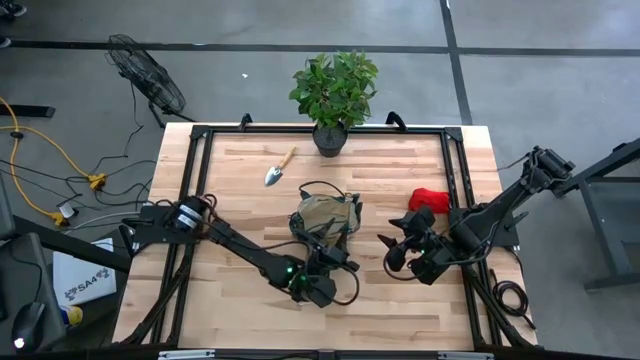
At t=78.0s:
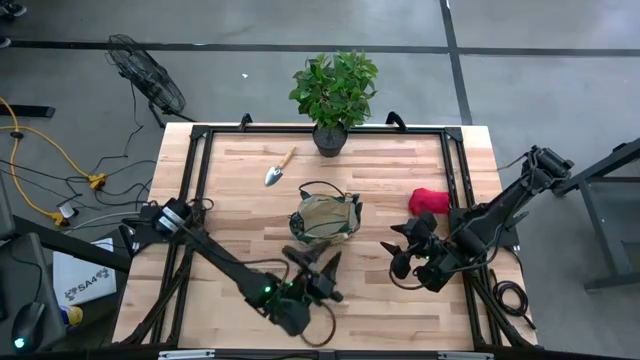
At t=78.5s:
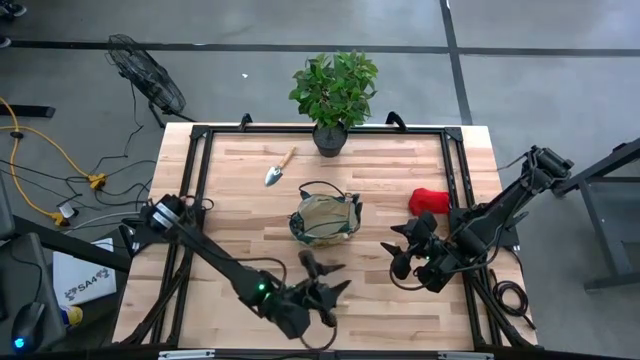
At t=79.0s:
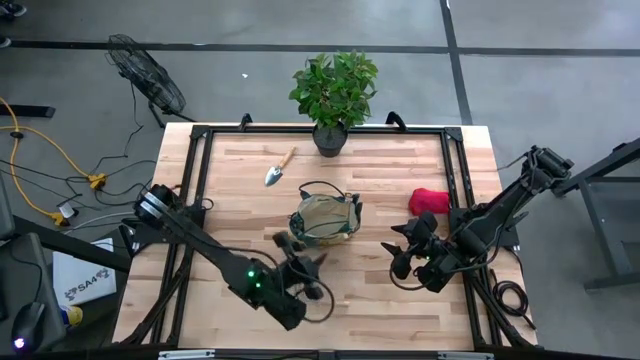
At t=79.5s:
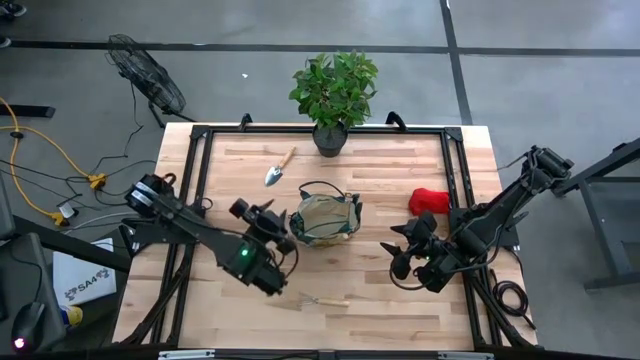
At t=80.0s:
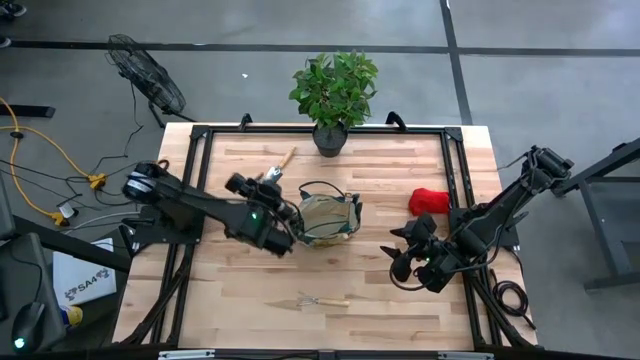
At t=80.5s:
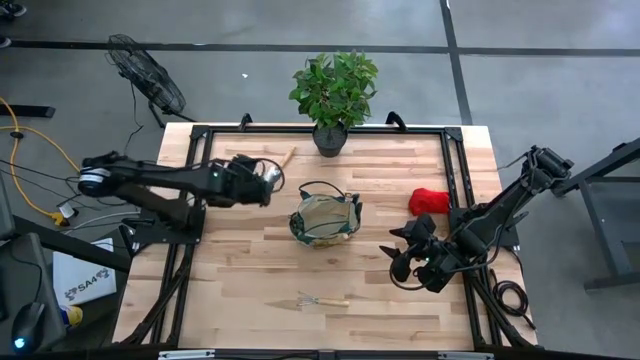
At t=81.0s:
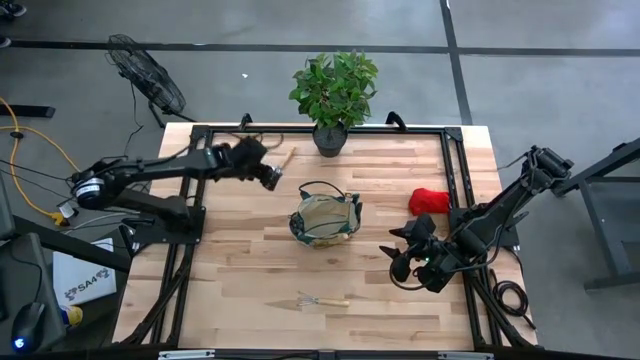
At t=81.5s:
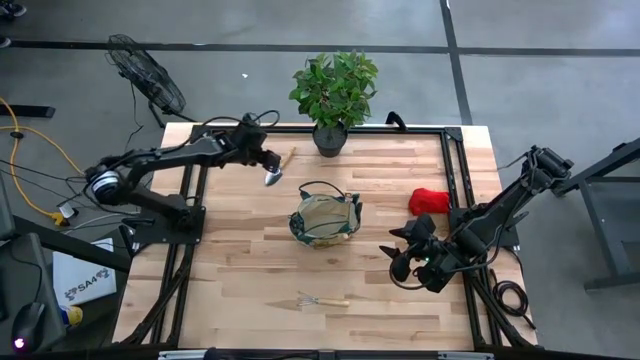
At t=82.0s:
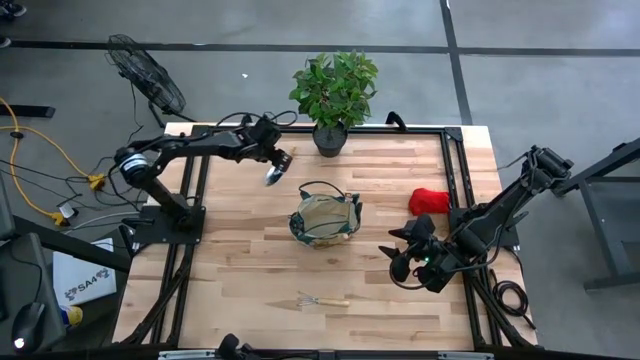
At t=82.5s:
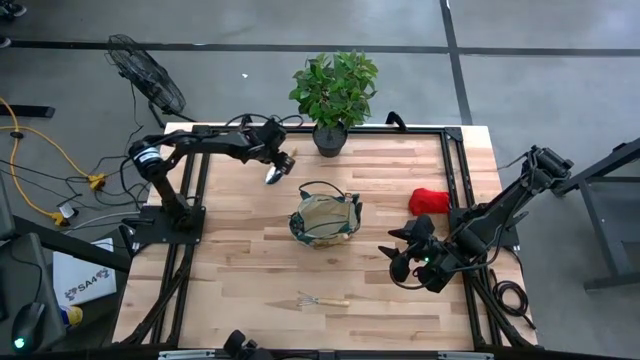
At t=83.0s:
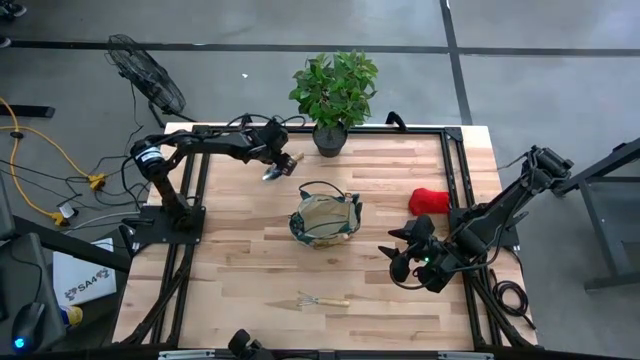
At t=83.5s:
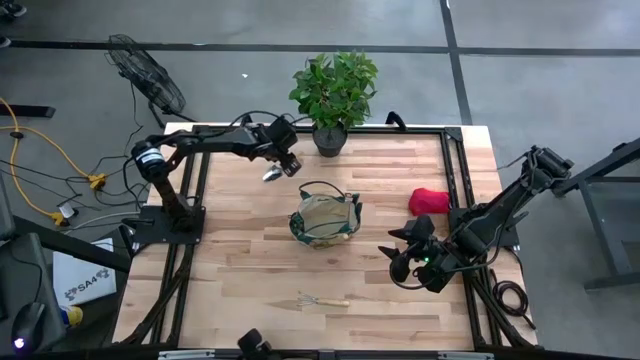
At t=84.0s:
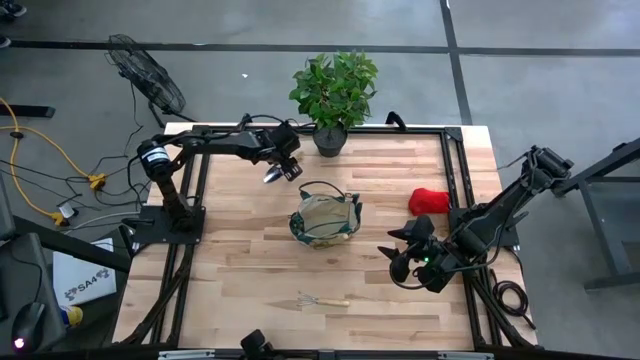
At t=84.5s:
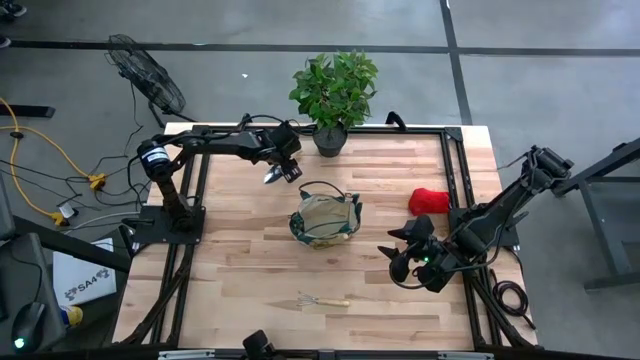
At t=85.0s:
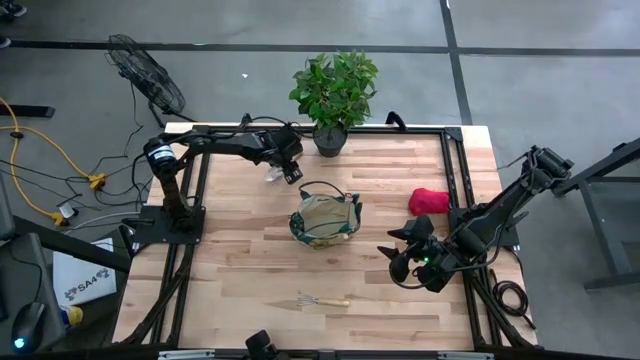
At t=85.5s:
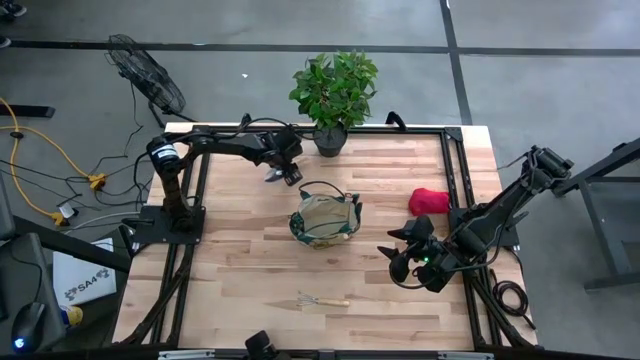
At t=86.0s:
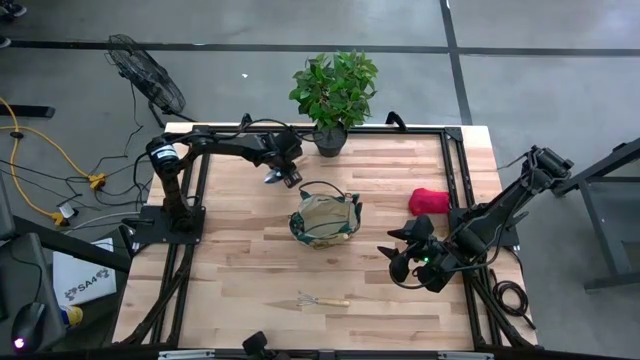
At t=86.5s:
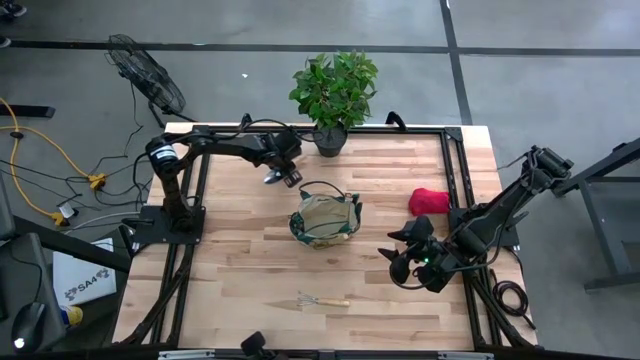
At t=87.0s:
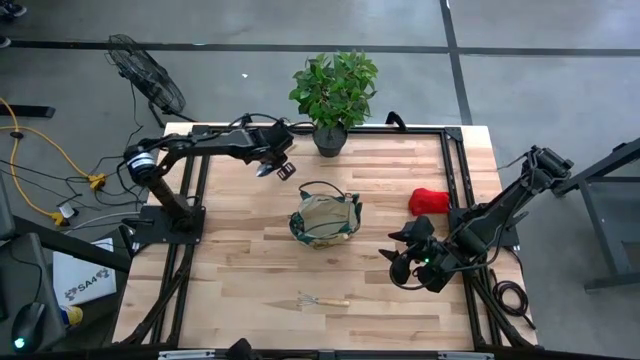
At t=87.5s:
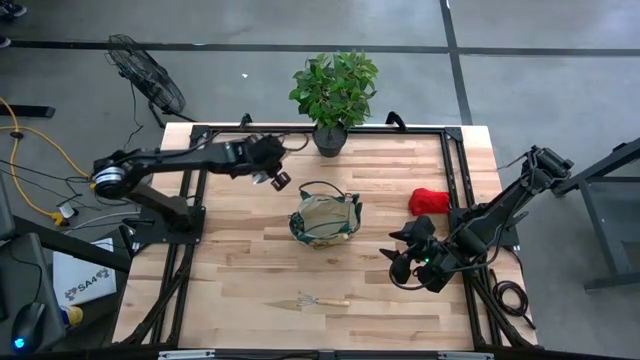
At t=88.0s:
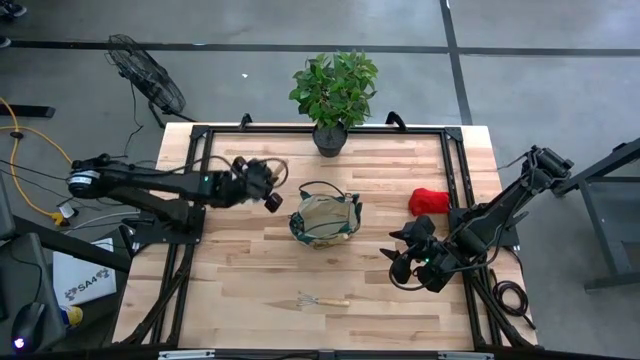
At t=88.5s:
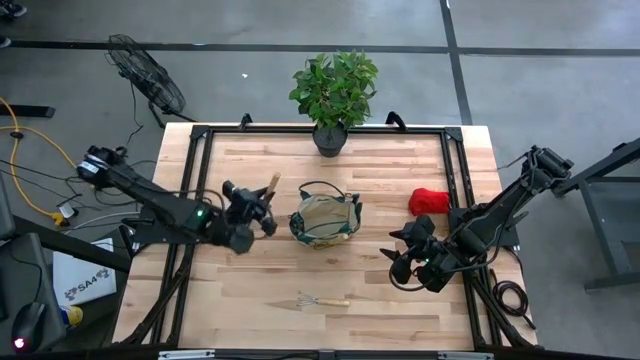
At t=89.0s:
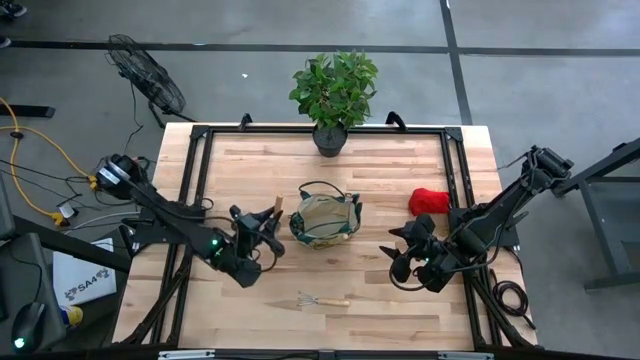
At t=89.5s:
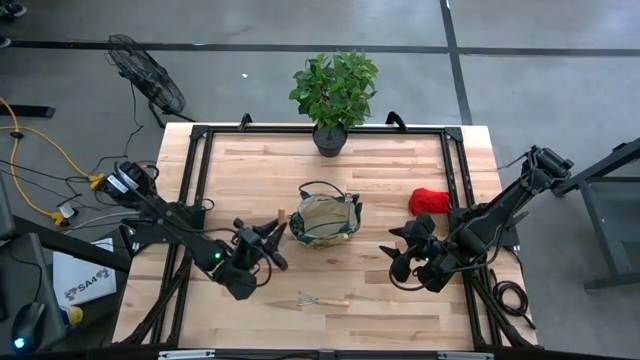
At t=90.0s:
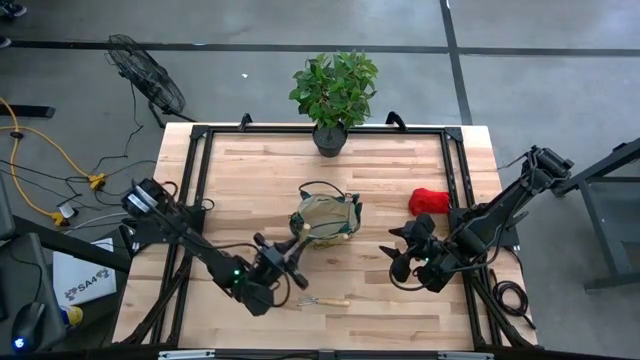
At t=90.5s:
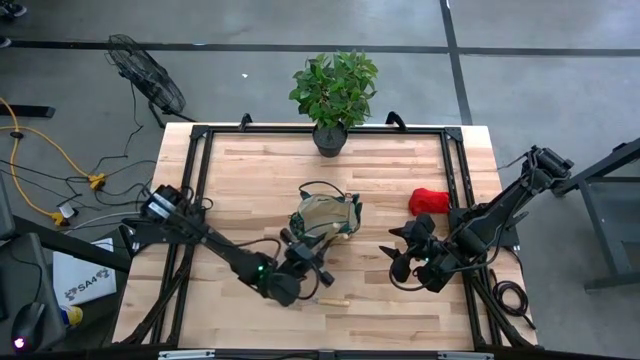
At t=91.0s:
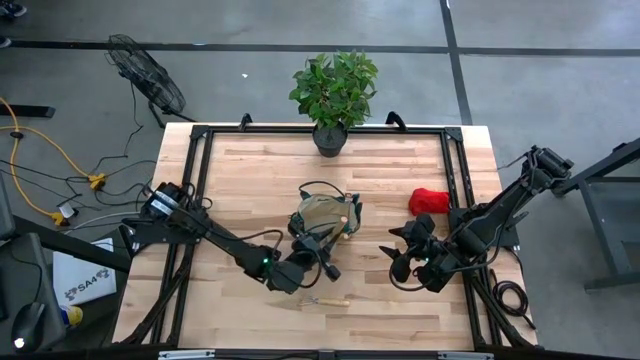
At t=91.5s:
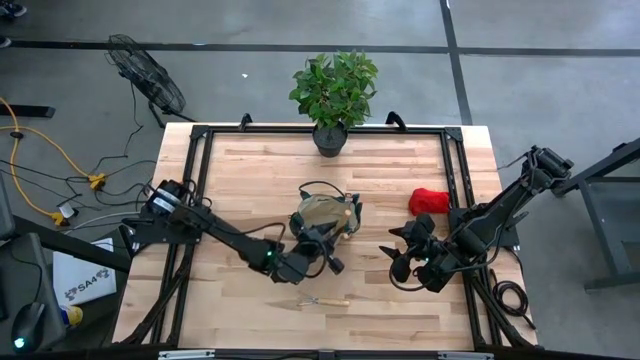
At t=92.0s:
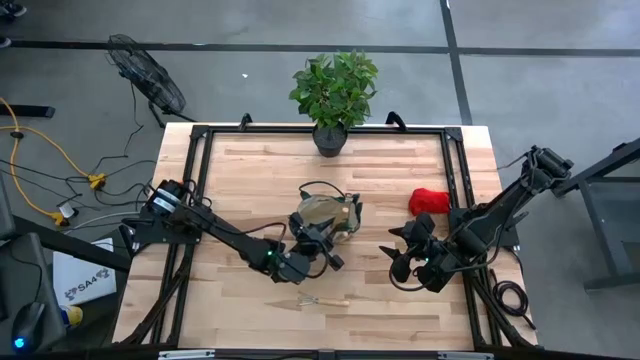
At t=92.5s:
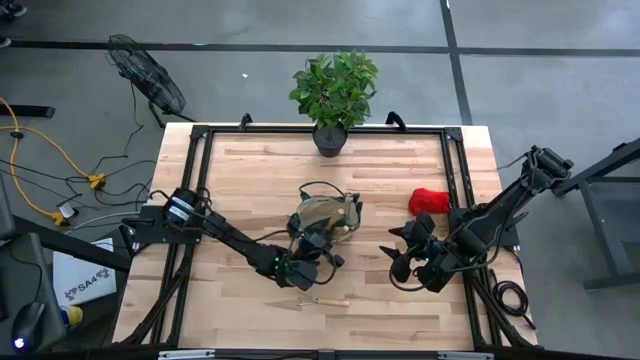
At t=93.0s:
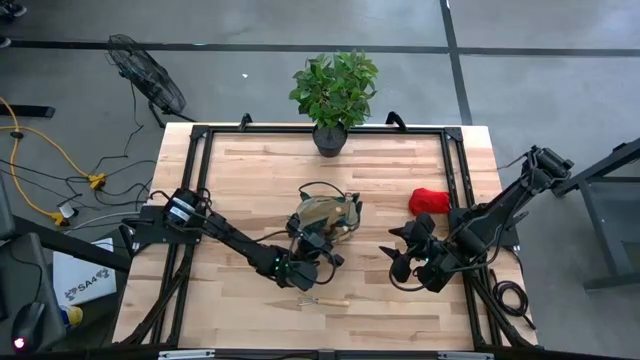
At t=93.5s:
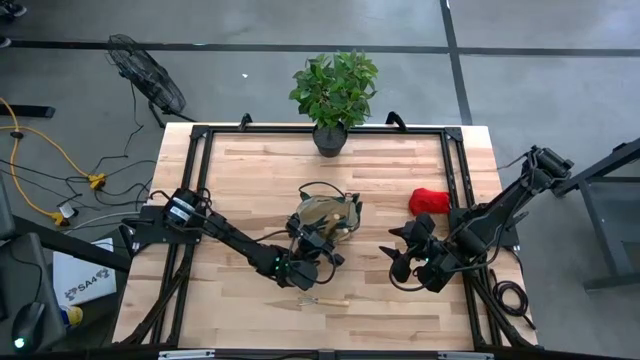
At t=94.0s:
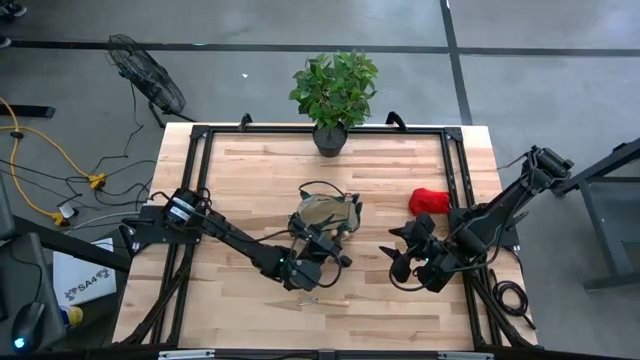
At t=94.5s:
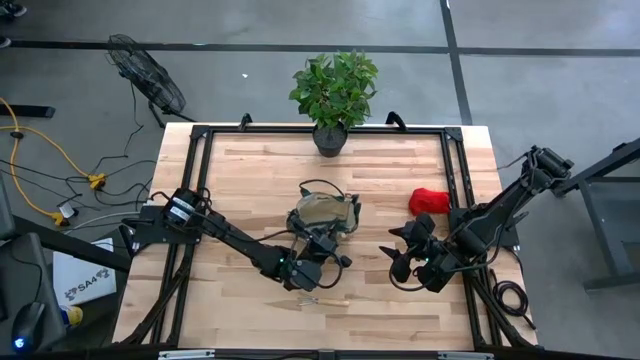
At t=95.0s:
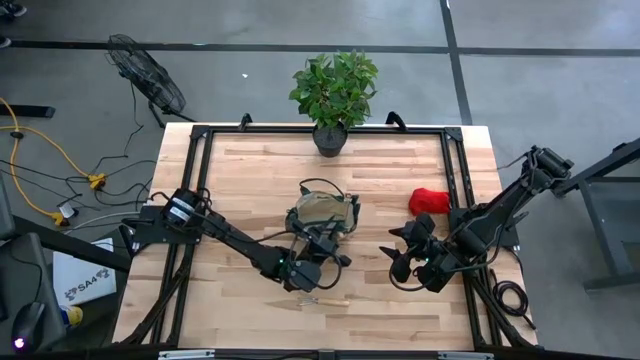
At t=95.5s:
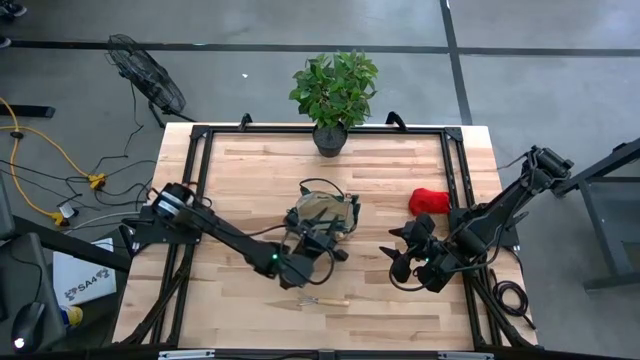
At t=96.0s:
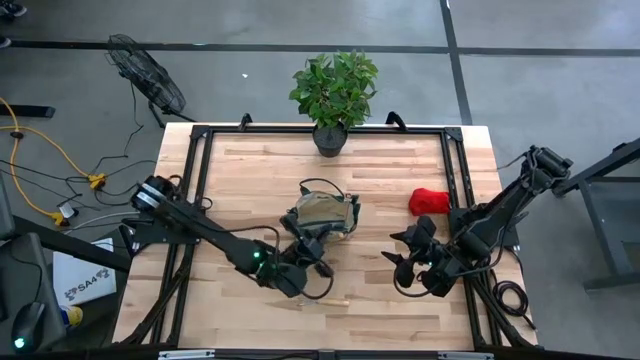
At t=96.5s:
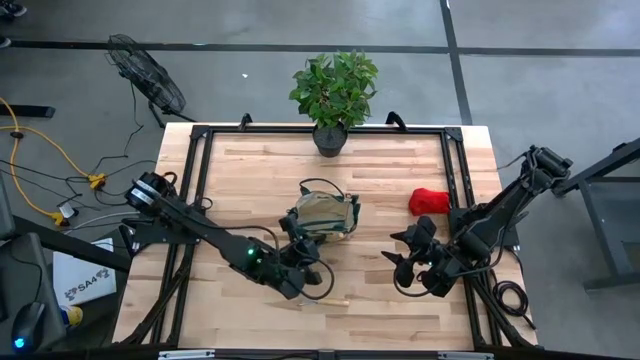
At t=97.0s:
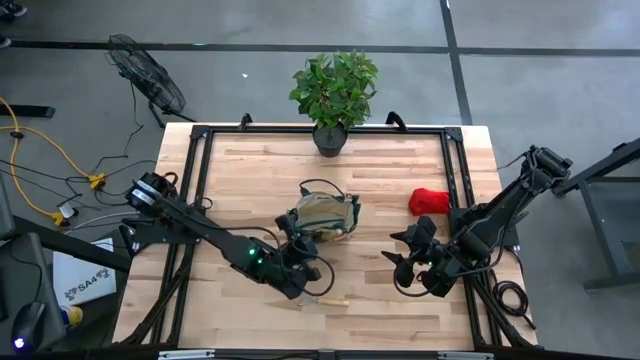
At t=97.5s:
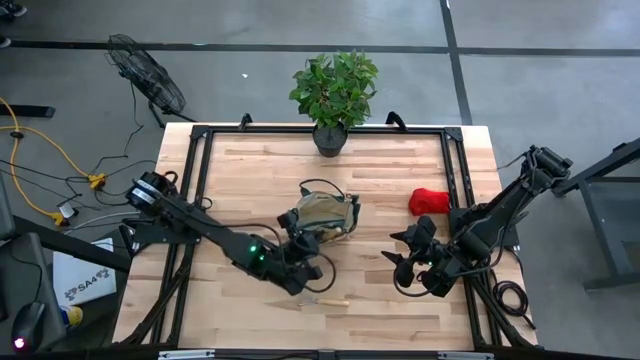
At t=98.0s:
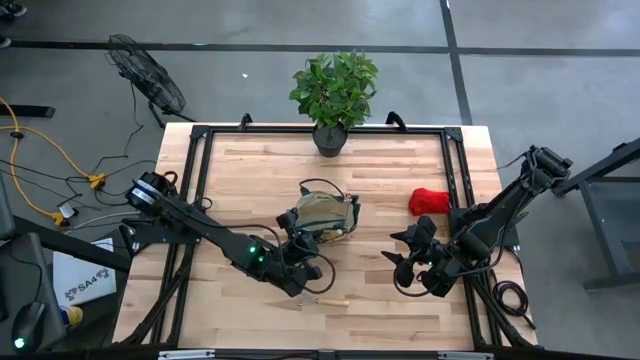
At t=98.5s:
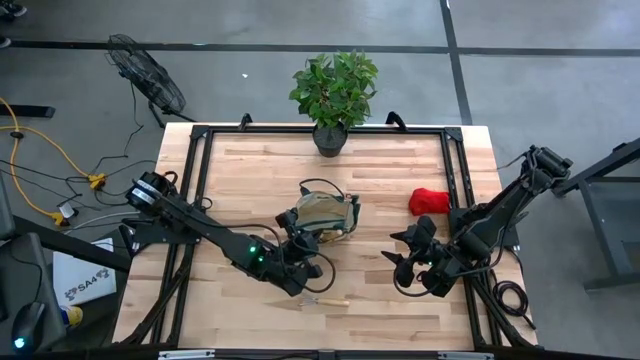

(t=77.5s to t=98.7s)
Task: Pick & Place Garden tools in Gardening bag
Put the brown trowel into the gardening bag
